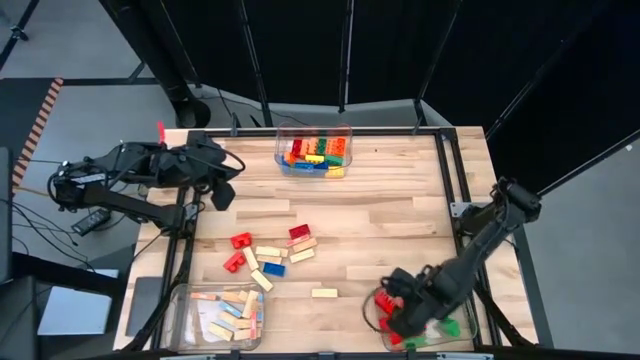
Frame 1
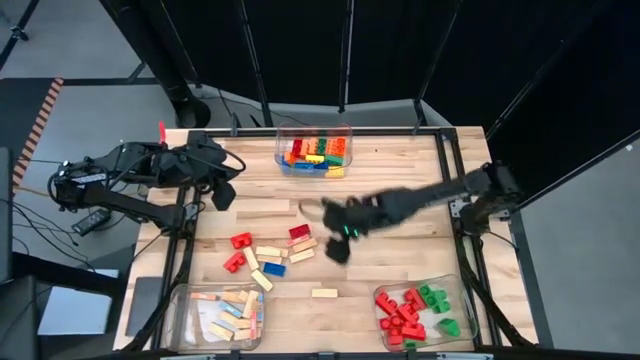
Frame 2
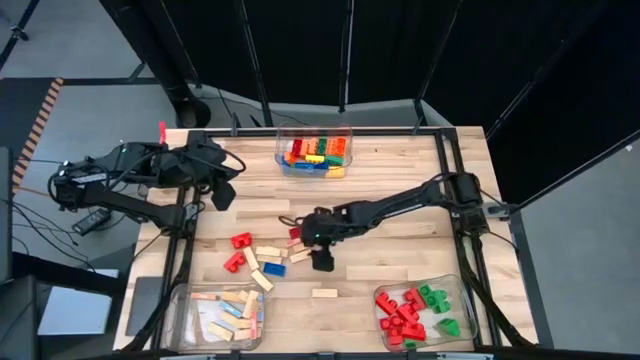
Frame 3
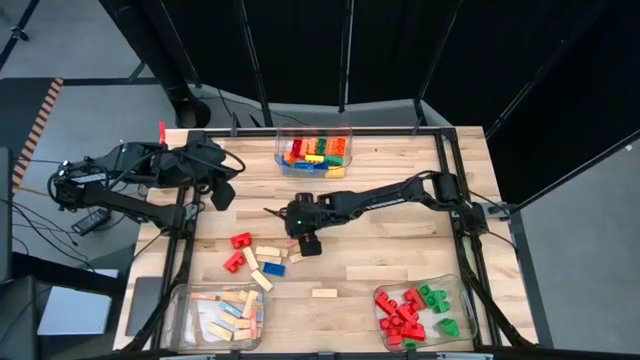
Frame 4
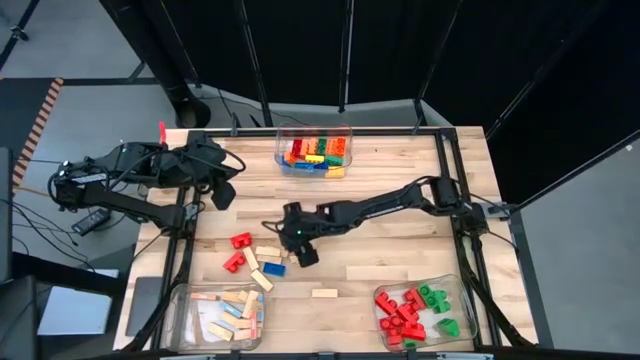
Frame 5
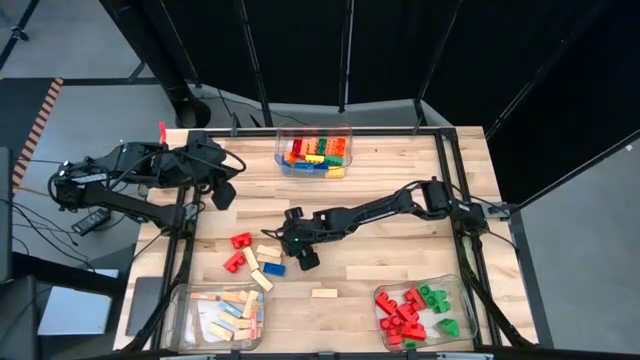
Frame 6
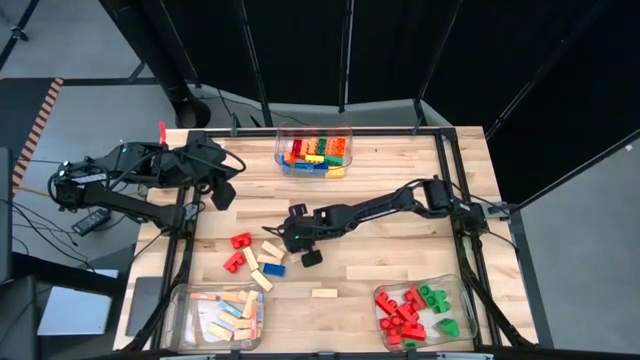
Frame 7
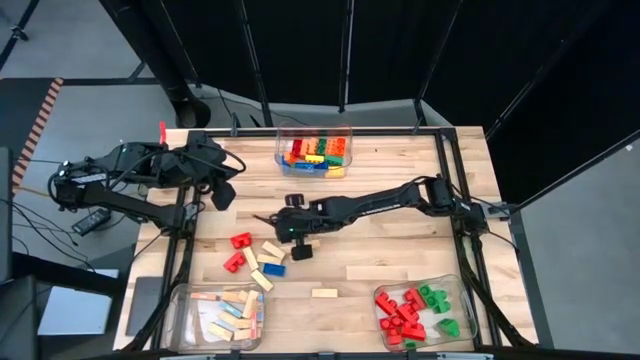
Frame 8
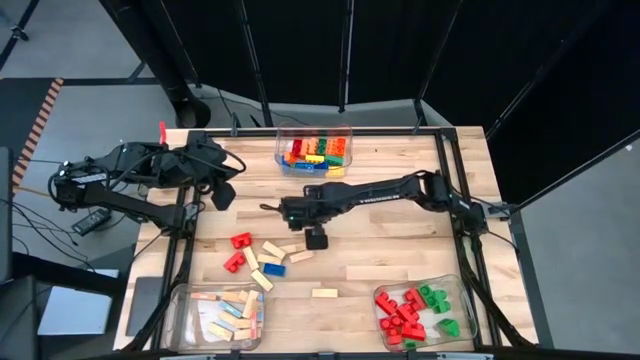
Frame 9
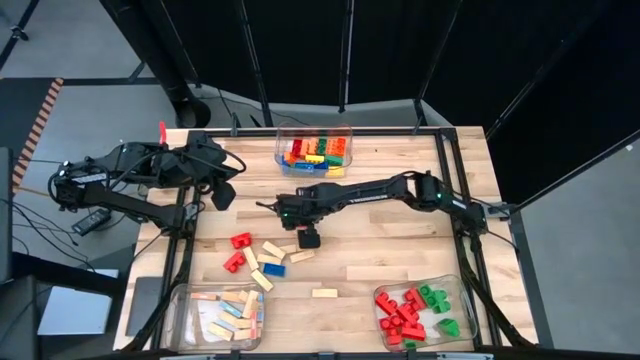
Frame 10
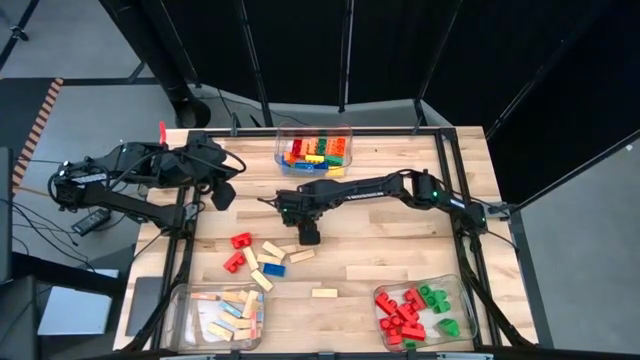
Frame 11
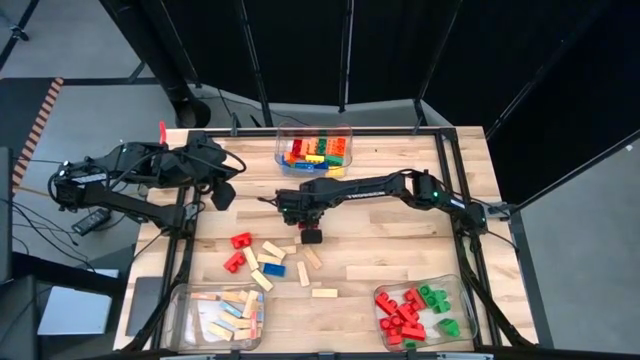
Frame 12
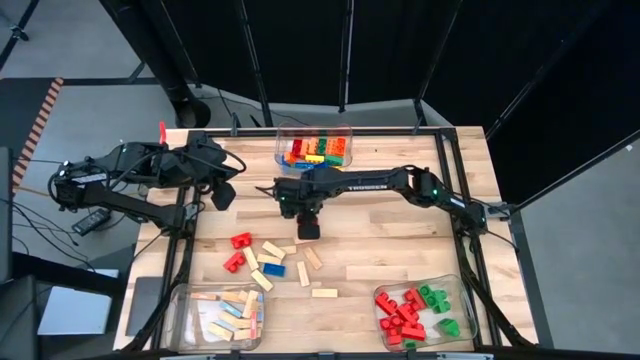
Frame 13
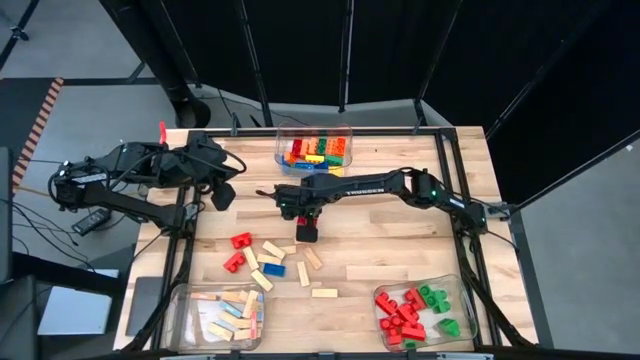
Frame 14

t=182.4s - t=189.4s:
Task: Sort blocks by size
Put the 3-stud red game piece into the top center transparent bin

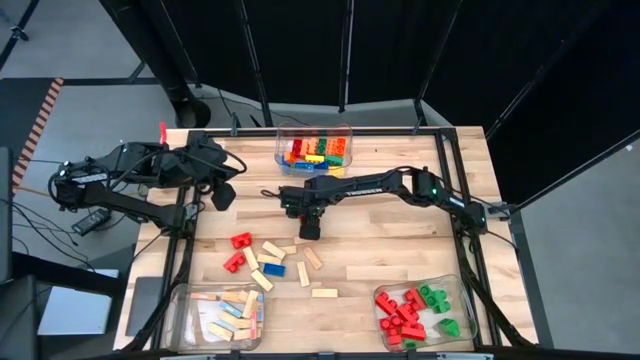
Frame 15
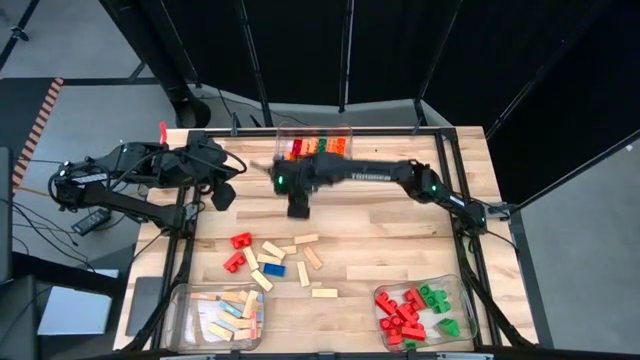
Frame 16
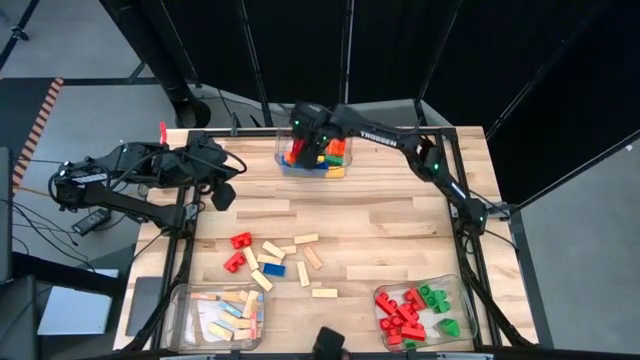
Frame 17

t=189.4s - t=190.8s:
Put the 3-stud red game piece into the top center transparent bin

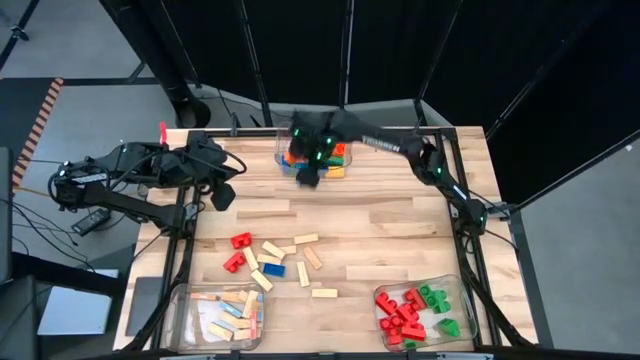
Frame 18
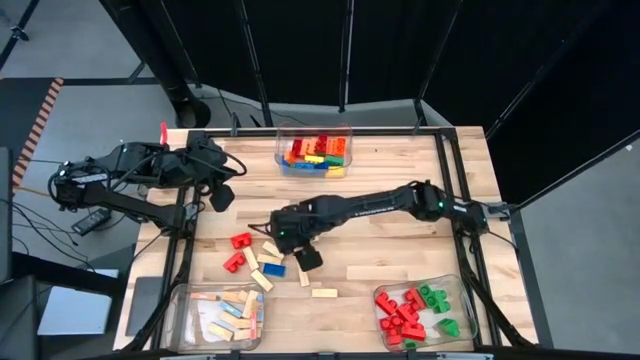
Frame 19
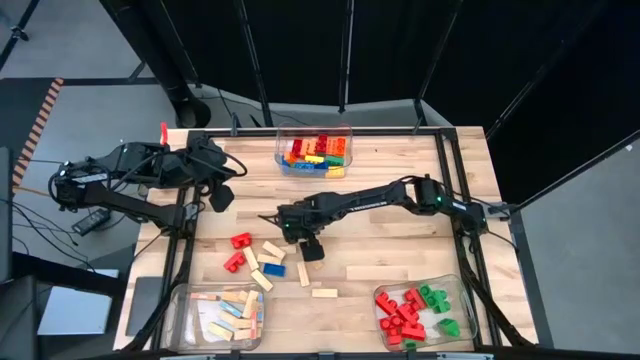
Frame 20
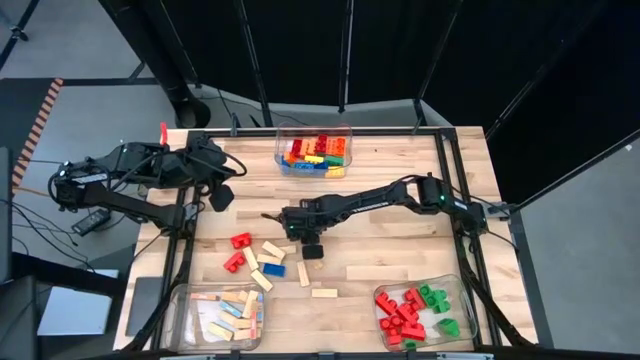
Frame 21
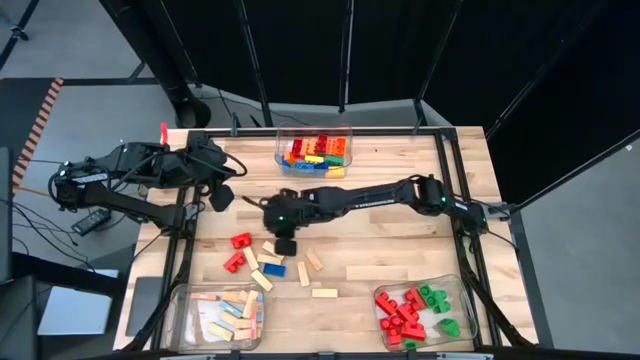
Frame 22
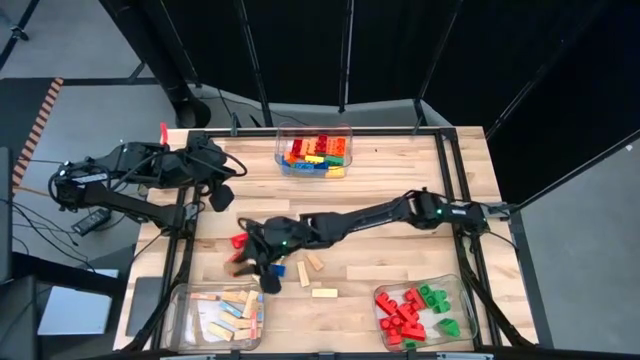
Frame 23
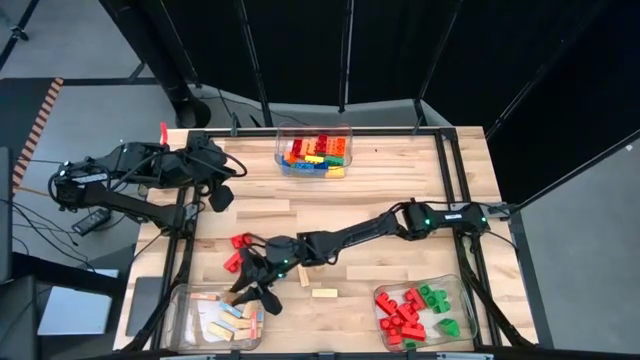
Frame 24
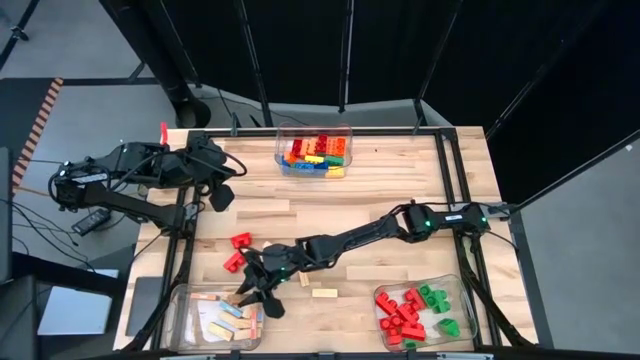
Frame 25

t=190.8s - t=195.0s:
Put the white block into the bottom left transparent bin

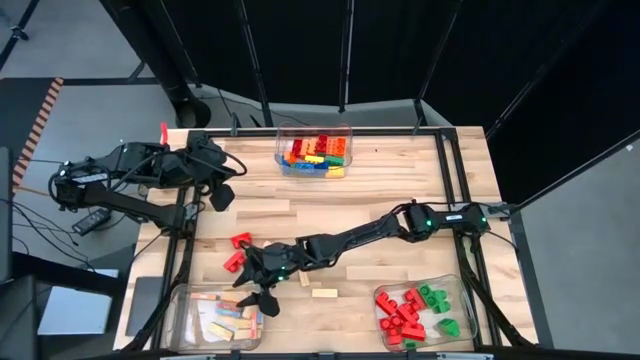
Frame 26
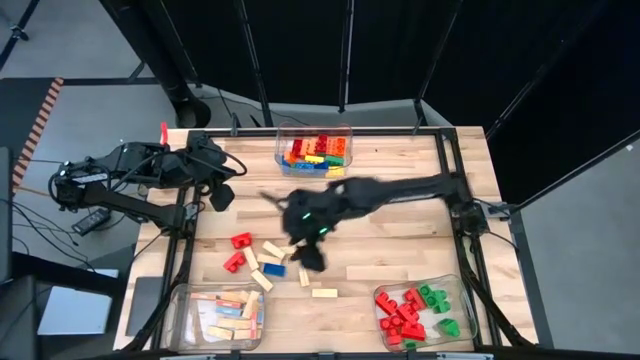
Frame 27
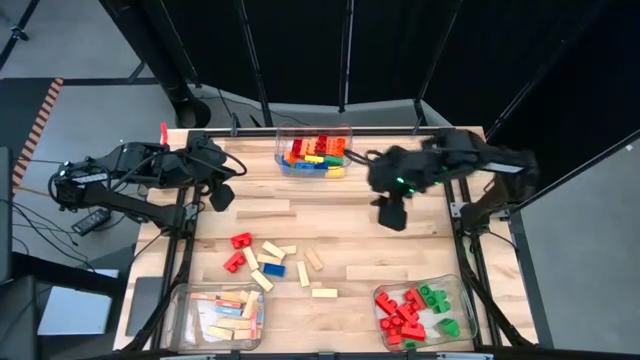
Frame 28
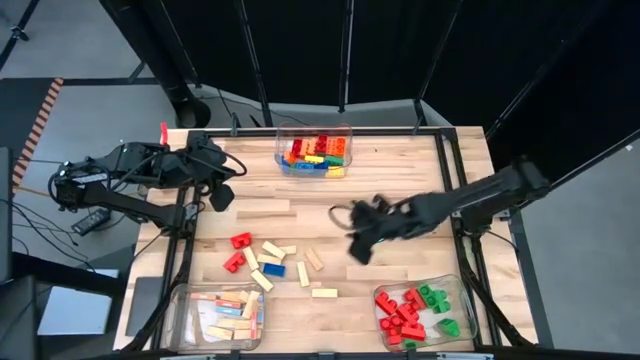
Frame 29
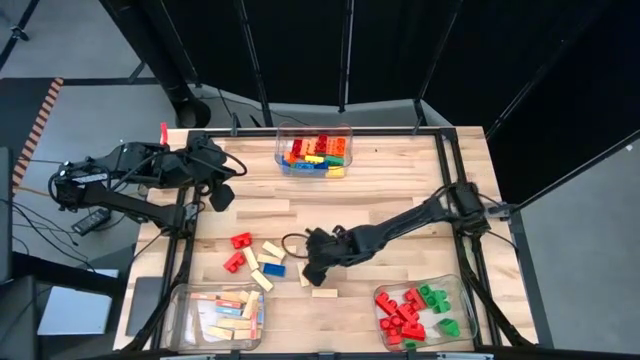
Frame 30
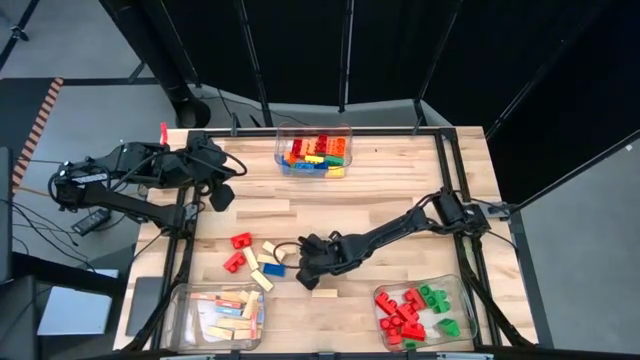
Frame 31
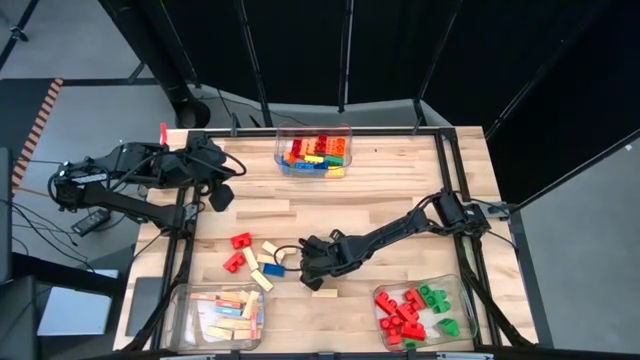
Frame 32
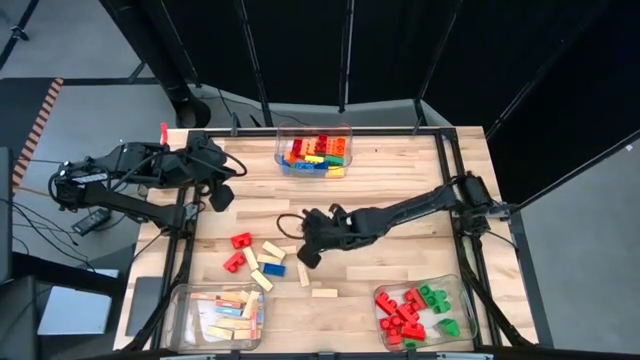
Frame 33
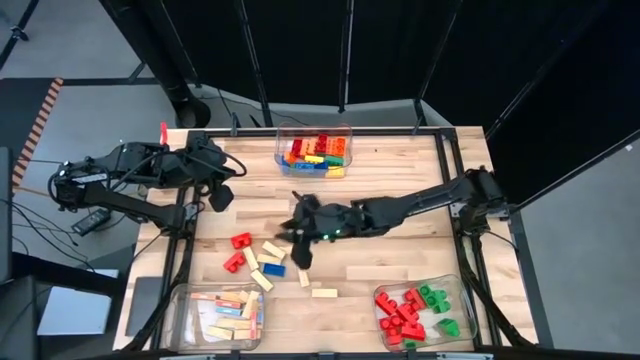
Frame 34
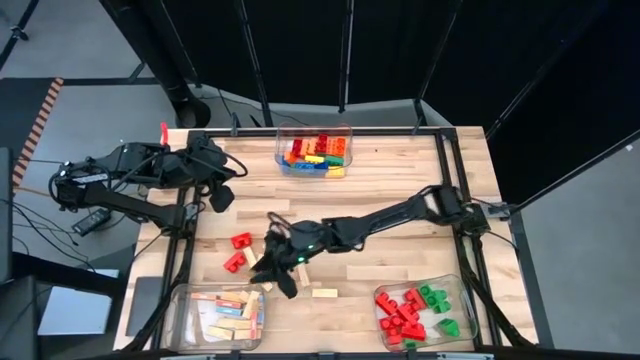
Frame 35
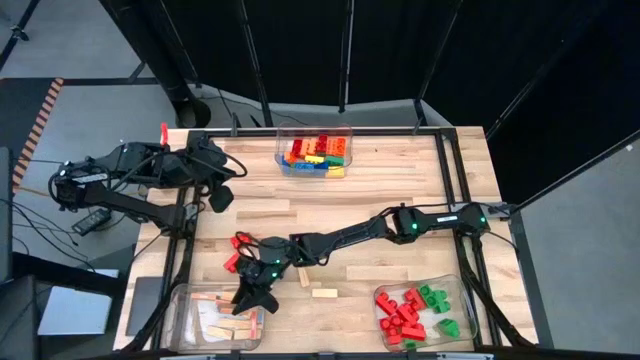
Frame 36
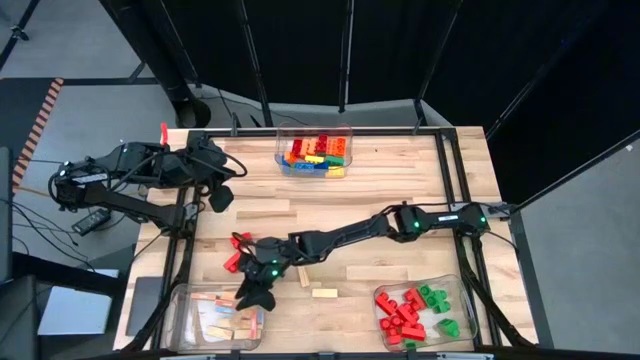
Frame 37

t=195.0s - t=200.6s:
Put the white block into the bottom left transparent bin

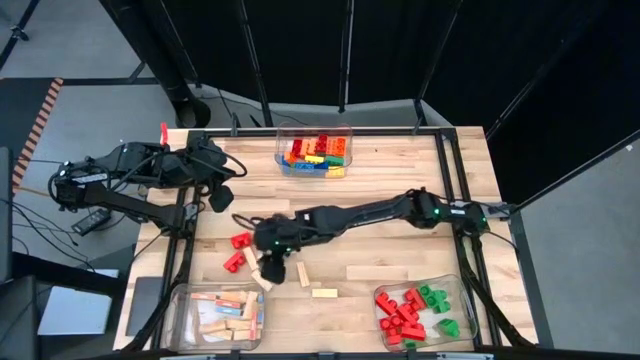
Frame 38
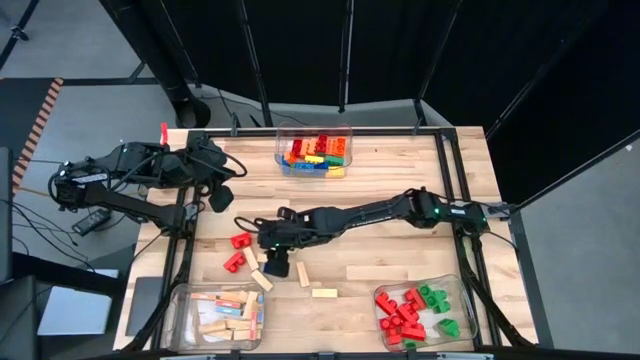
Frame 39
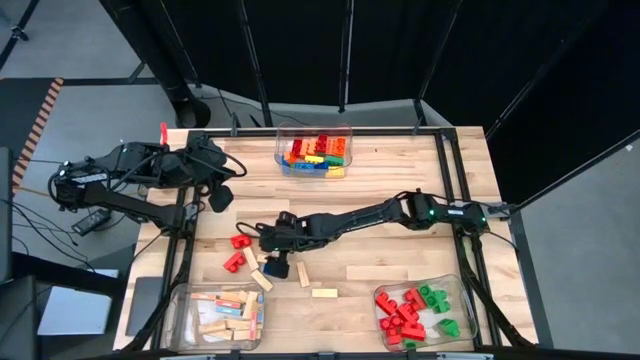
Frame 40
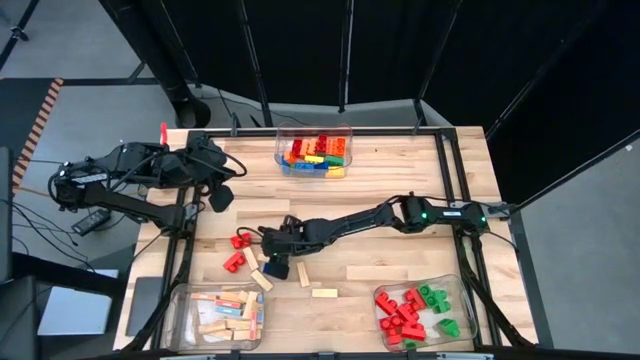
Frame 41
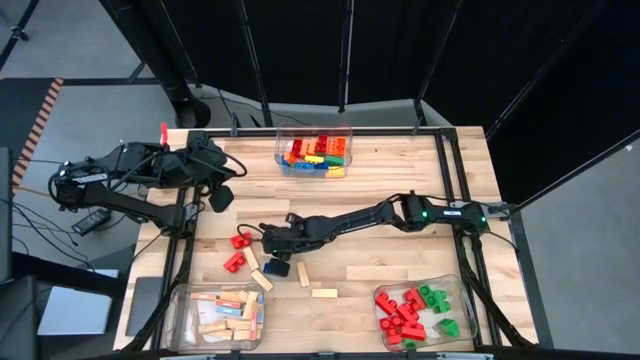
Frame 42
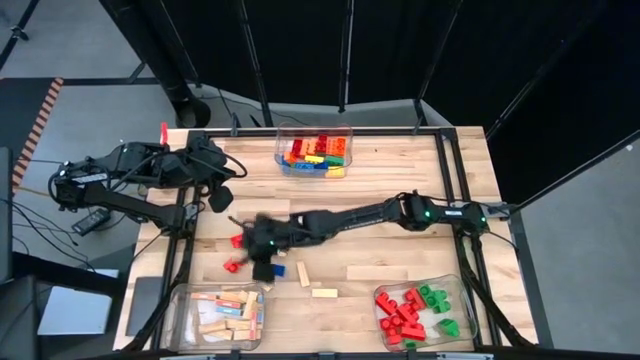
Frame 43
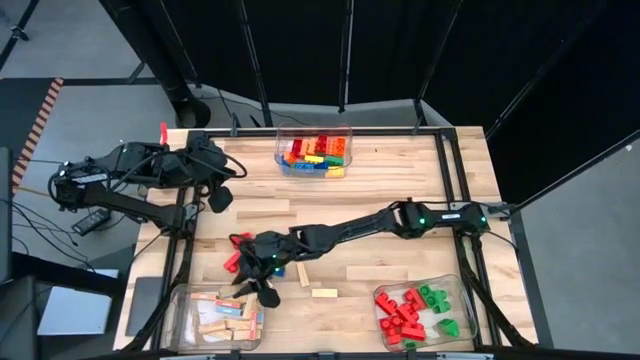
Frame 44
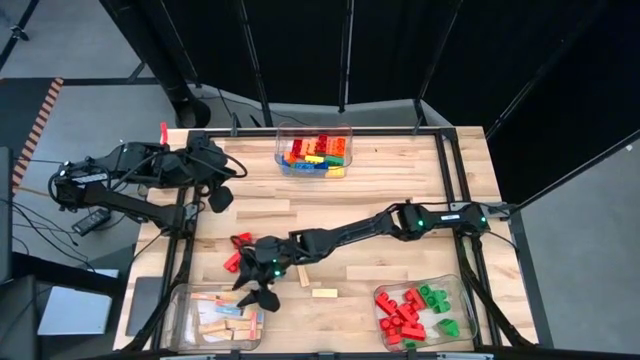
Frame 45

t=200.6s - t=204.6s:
Put the white block into the bottom left transparent bin
